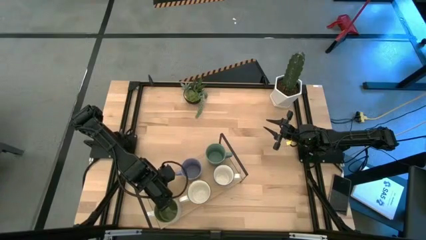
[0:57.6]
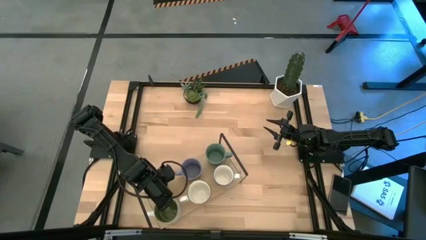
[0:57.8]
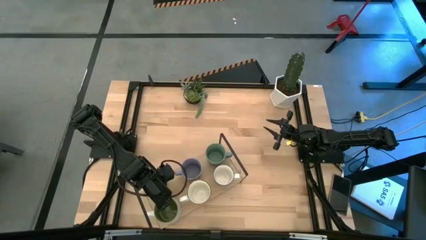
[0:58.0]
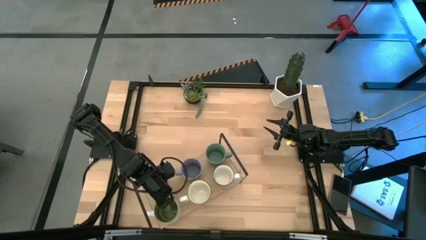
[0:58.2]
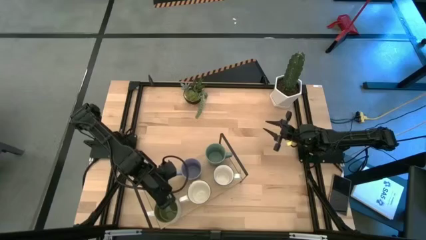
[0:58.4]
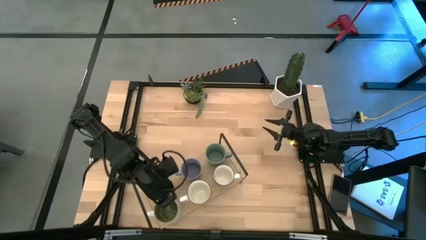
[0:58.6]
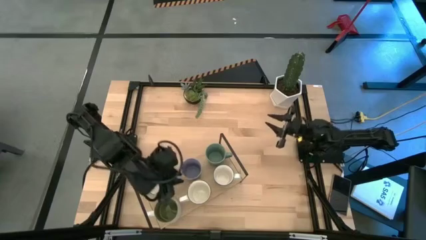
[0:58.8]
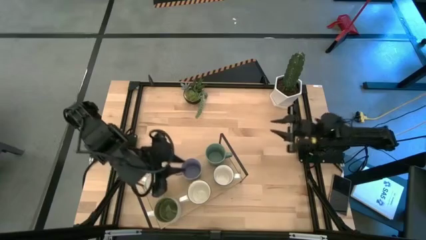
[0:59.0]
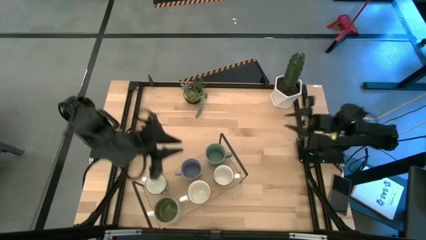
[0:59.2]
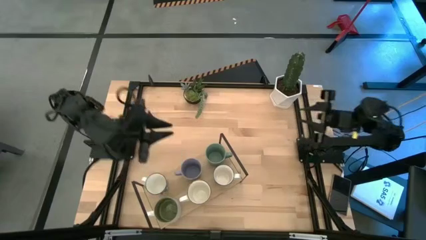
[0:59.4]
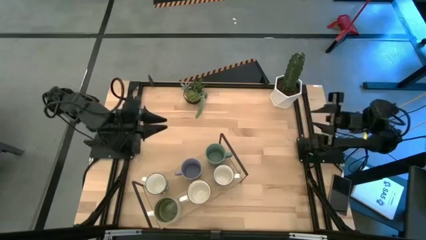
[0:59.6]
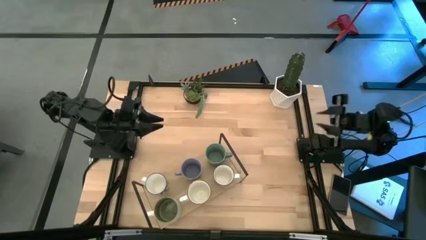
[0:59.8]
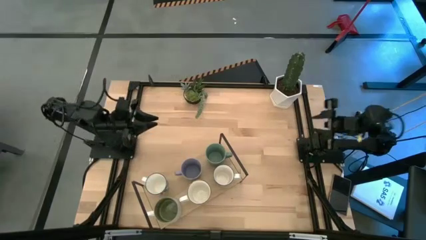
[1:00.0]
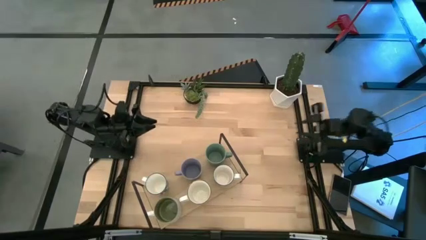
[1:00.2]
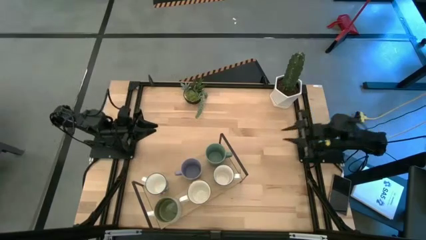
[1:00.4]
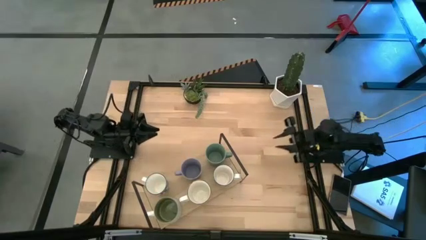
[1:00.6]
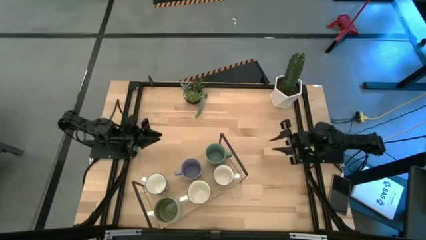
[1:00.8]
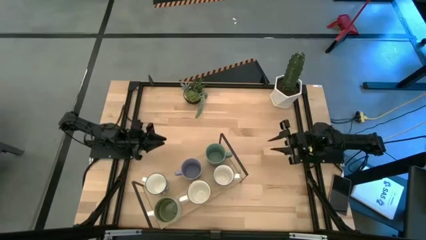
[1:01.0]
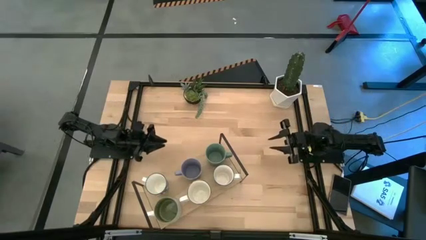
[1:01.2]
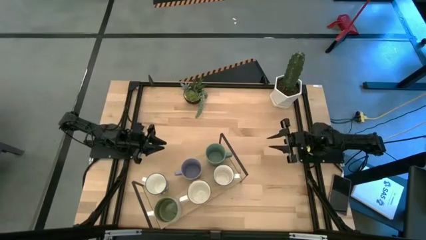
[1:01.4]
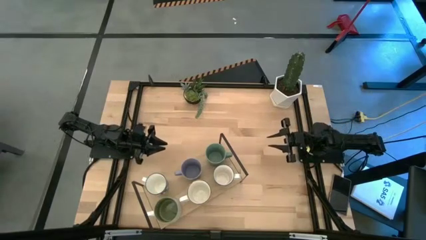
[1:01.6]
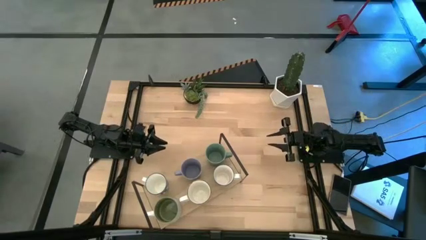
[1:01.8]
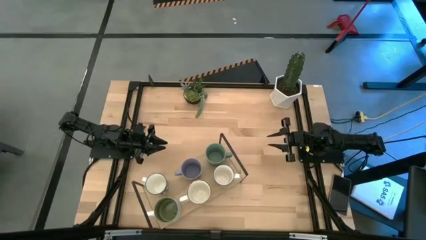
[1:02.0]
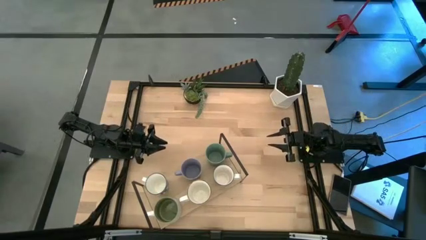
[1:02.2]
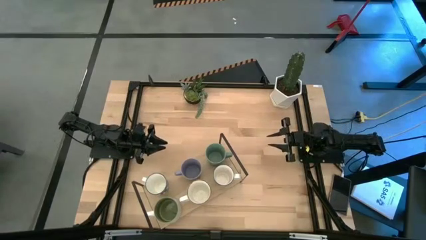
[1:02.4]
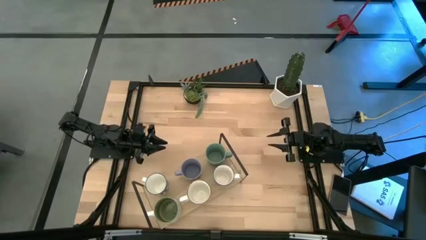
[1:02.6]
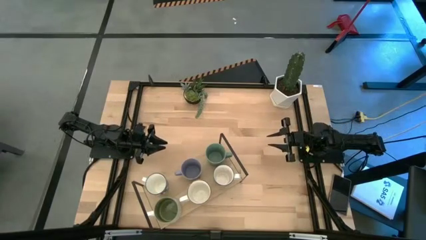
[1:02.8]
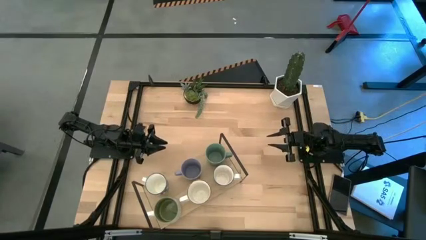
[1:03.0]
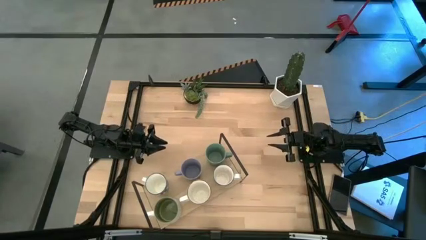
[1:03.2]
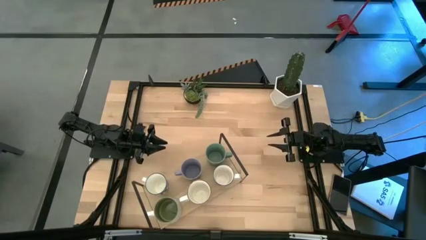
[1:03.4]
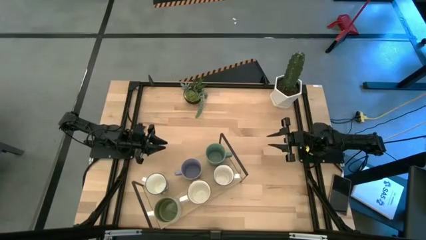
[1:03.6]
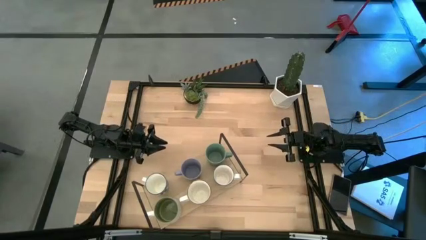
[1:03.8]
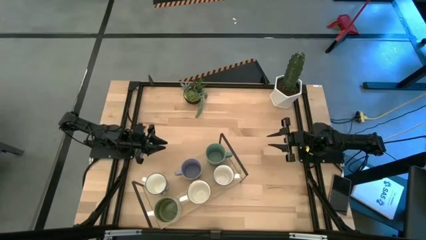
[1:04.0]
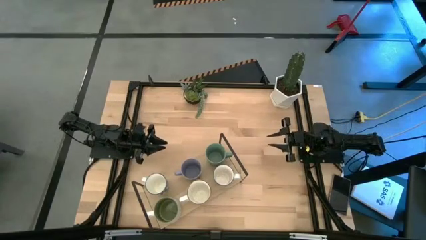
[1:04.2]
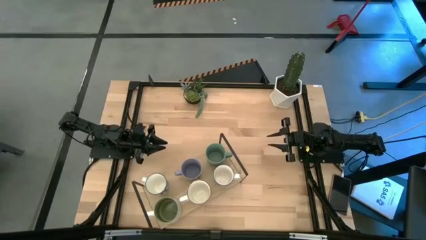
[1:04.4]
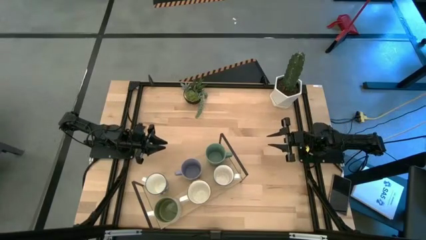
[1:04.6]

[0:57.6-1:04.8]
Task: Place coffee mugs
Return to Home Position

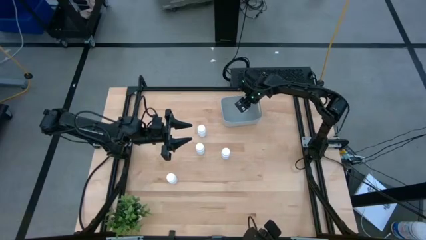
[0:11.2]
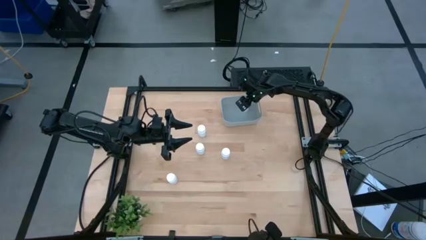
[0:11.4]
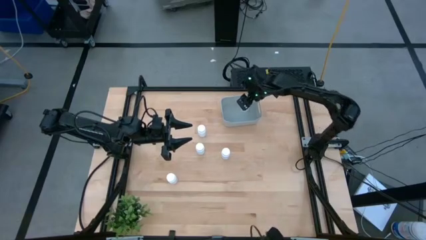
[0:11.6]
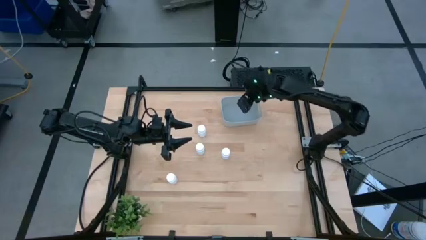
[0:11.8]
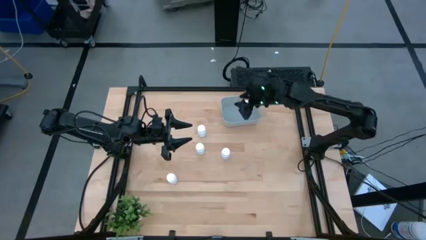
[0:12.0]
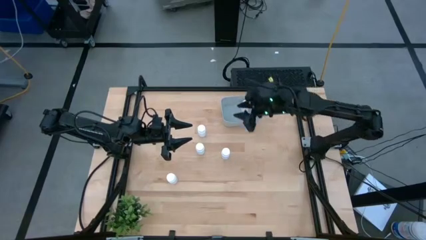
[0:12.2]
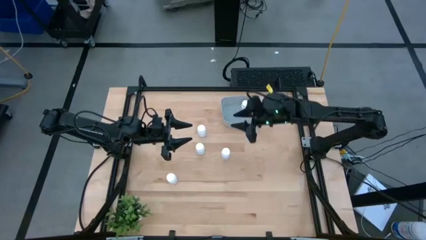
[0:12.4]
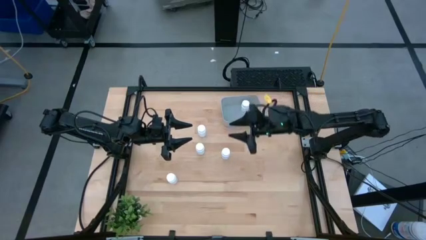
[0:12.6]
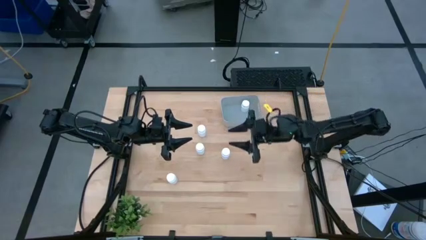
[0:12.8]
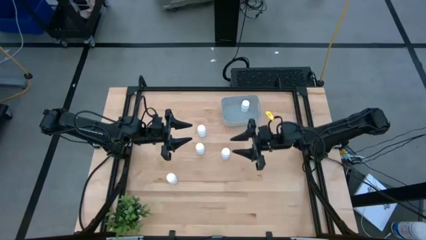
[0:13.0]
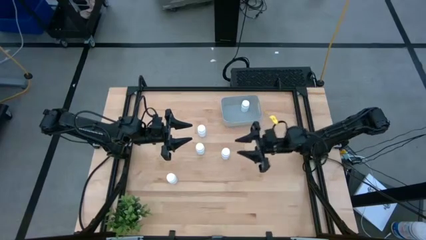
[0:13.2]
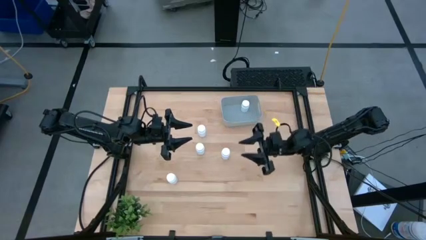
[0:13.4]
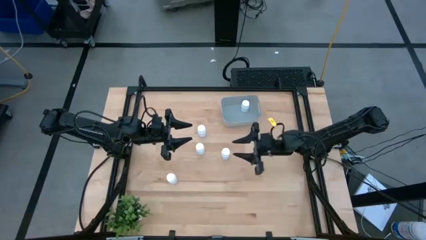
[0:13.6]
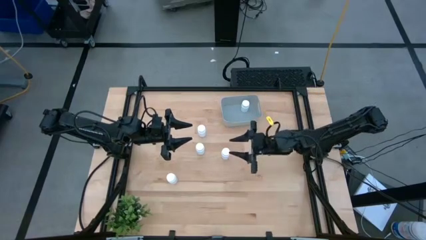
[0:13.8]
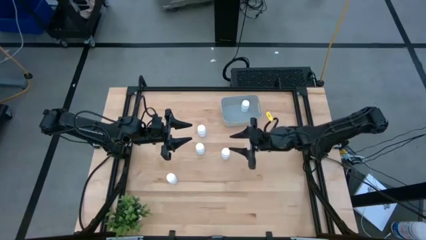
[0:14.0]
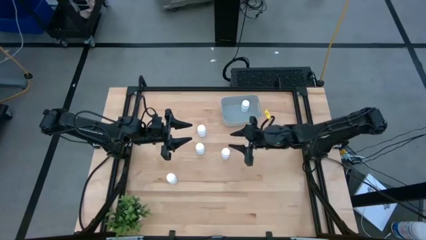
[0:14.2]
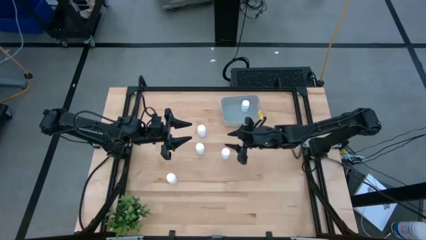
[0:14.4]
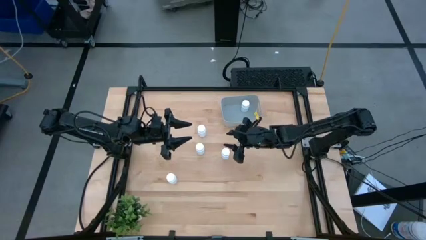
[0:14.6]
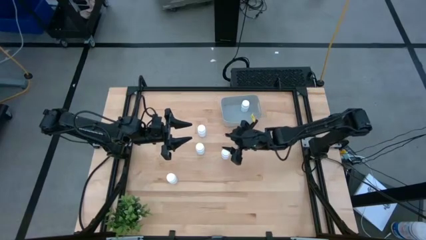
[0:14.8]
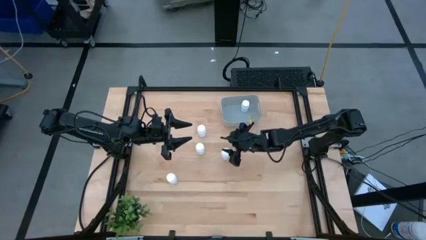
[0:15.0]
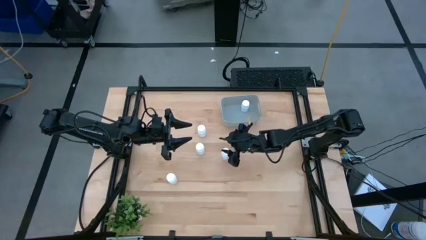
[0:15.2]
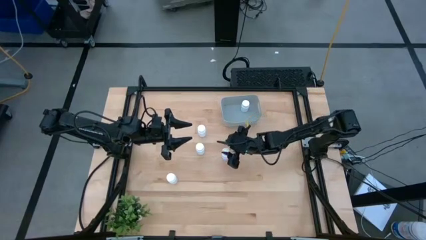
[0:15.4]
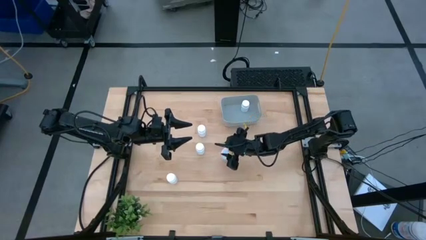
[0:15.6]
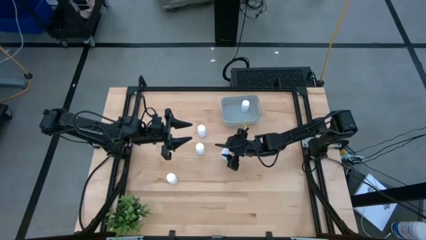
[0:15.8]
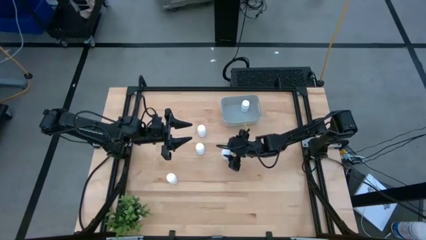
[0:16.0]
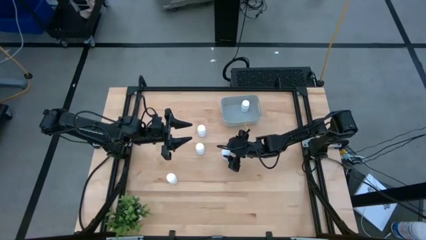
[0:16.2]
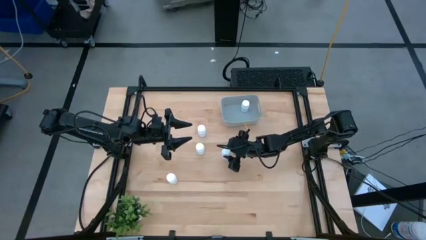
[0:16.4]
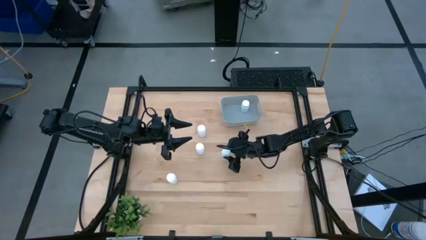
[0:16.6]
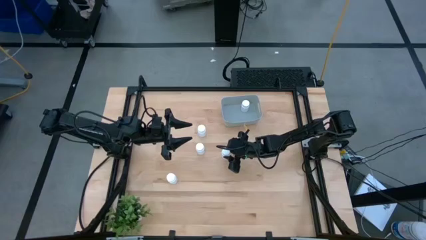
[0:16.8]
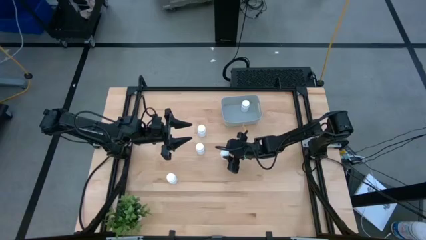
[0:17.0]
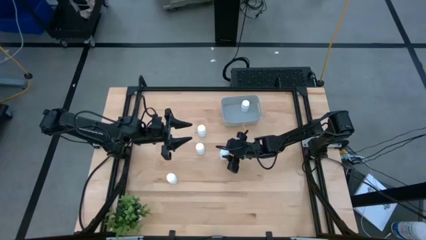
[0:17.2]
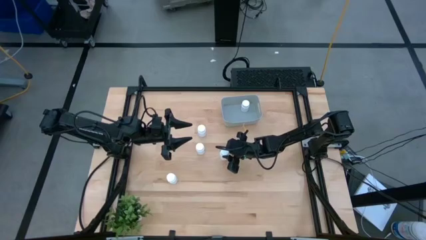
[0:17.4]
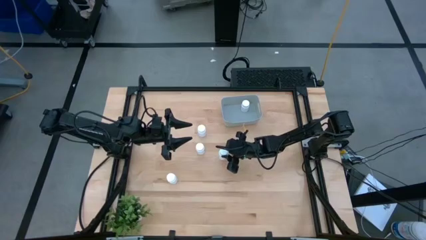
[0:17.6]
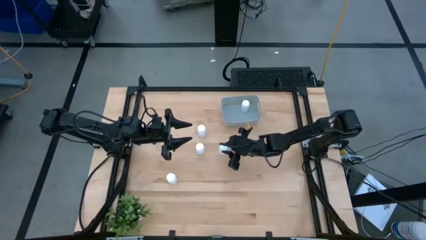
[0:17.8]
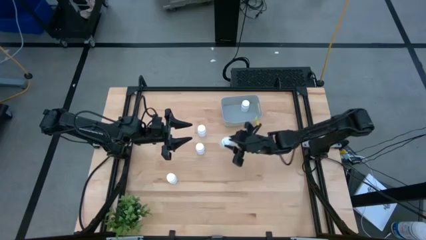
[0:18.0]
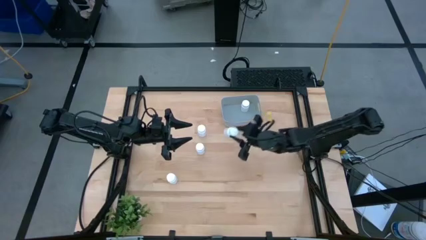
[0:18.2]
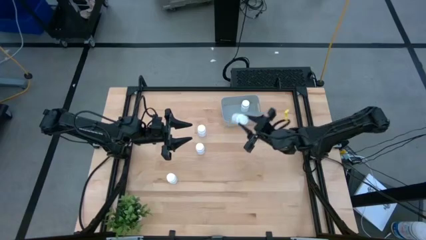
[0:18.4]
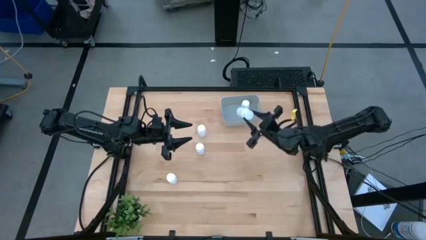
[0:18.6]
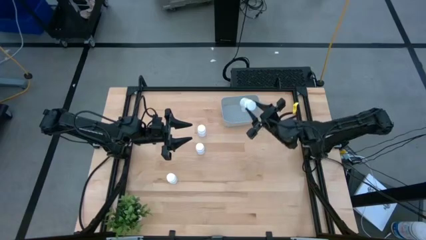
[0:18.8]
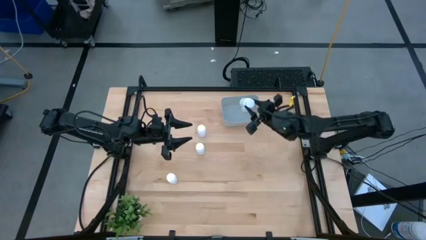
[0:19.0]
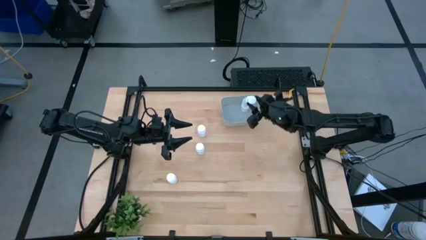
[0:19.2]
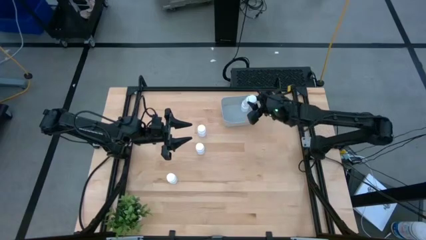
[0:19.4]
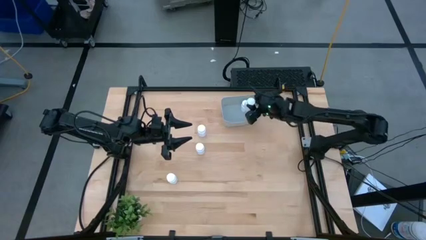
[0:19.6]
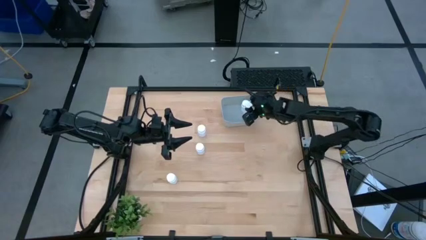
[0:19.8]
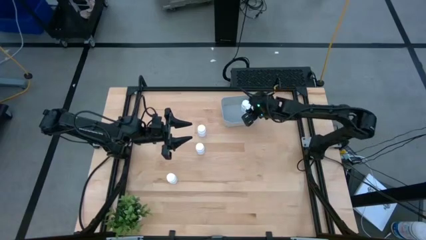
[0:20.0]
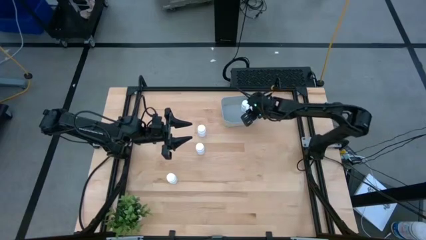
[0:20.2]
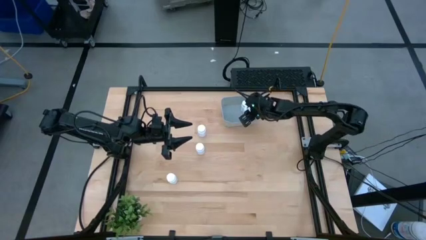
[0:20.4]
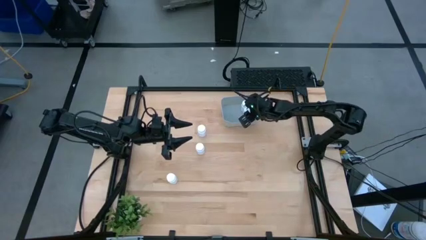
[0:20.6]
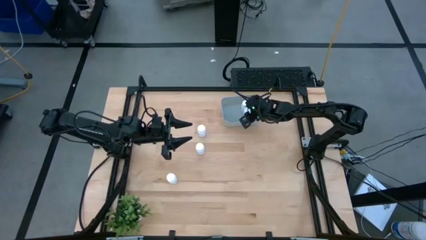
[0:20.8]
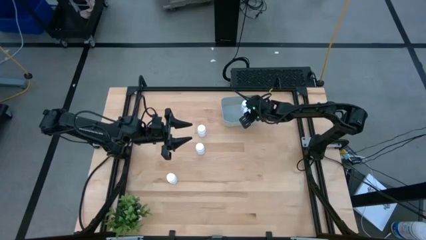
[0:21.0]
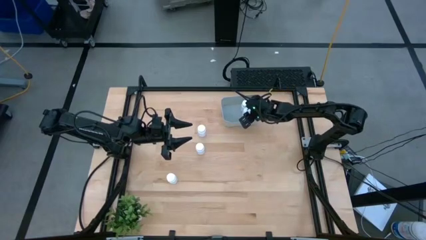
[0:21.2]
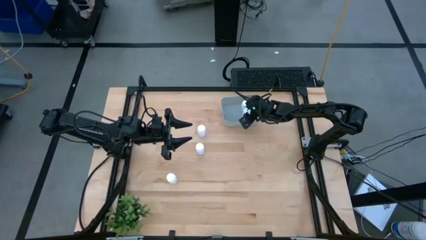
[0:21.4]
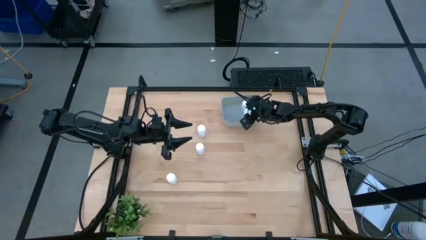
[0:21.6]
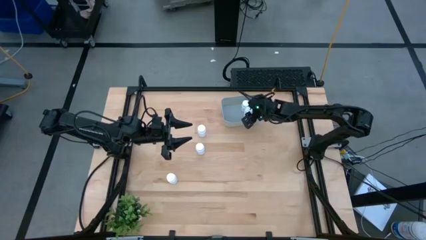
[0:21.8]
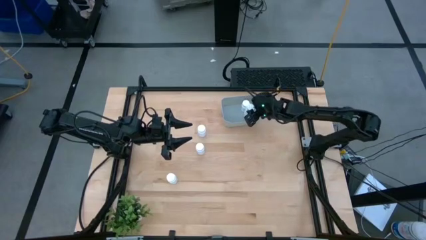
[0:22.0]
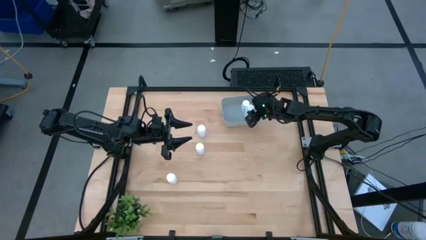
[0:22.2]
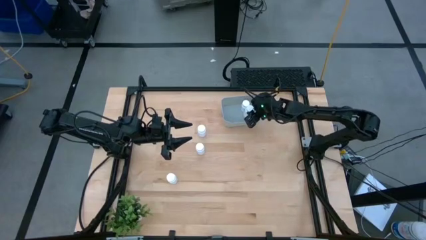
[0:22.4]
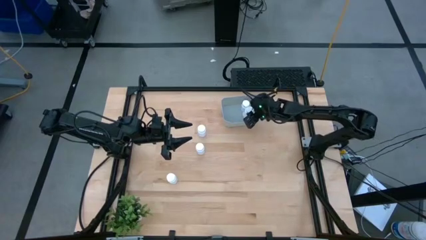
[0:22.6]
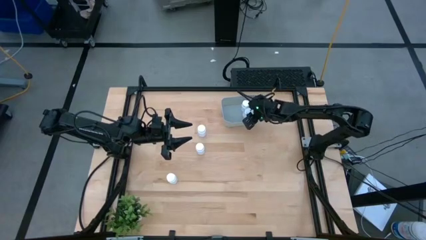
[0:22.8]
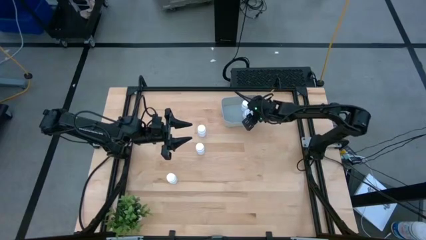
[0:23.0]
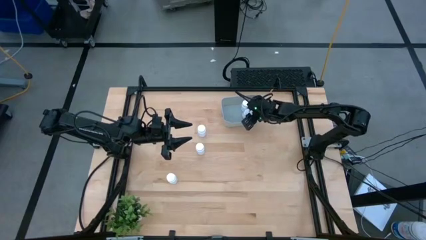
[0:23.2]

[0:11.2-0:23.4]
Task: Pick and place pill bottles into a basket
Put the white medicine bottle into the gray bin
